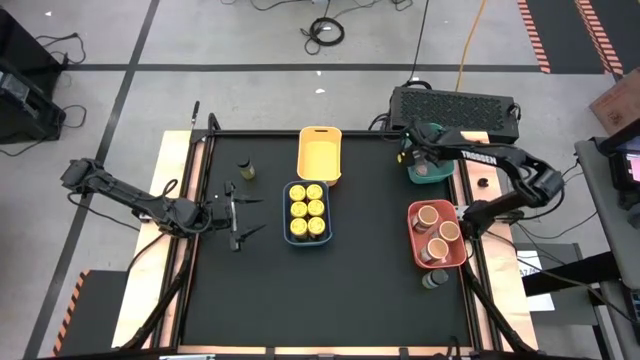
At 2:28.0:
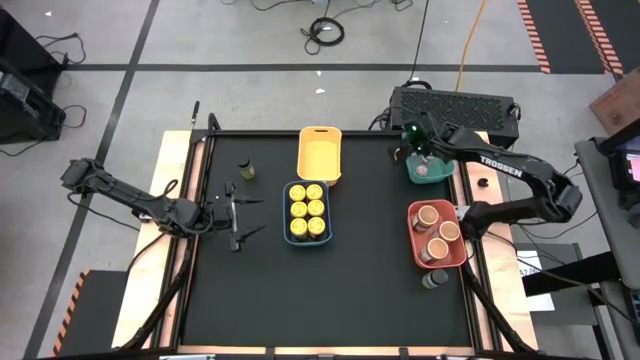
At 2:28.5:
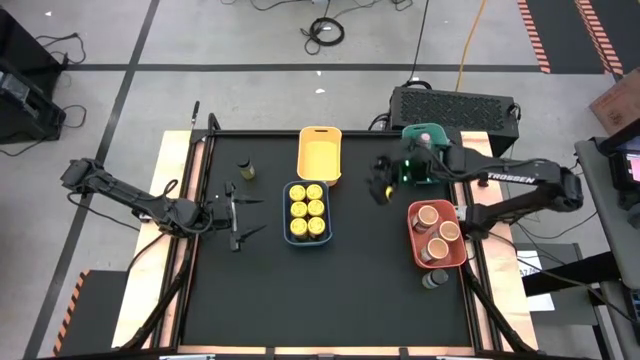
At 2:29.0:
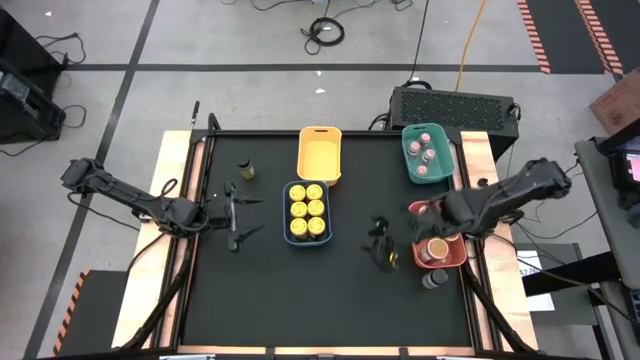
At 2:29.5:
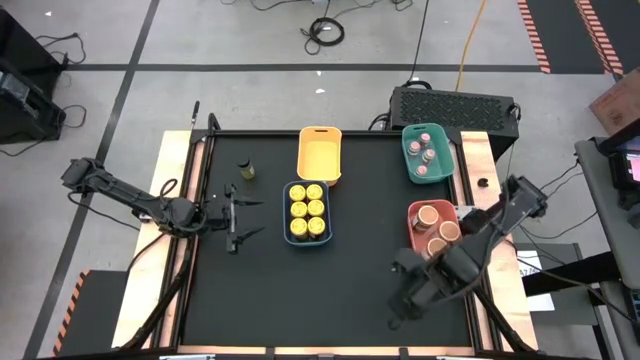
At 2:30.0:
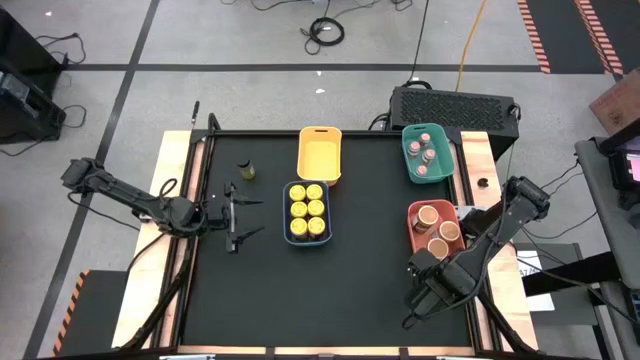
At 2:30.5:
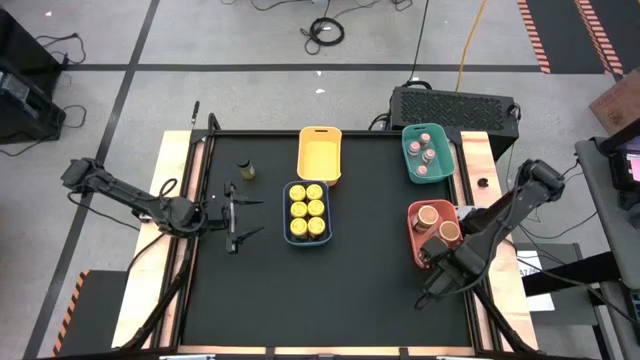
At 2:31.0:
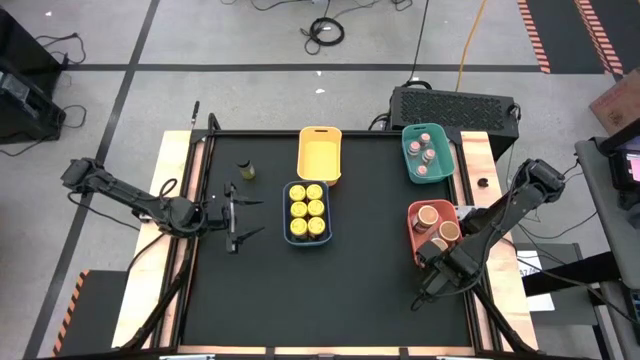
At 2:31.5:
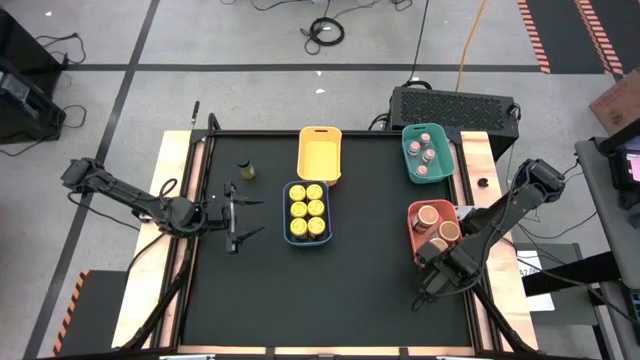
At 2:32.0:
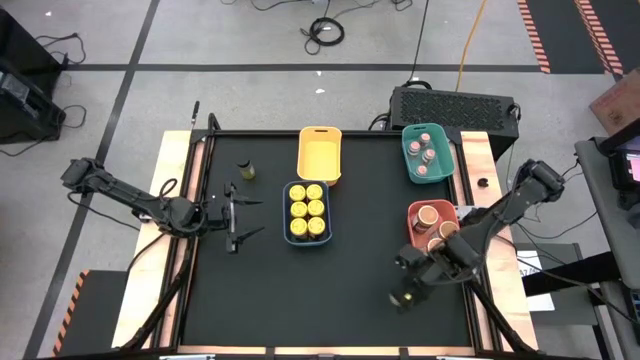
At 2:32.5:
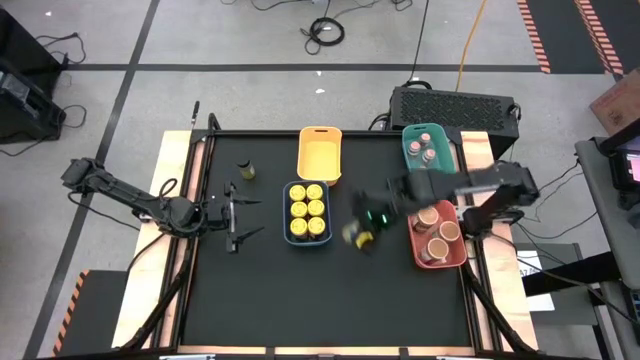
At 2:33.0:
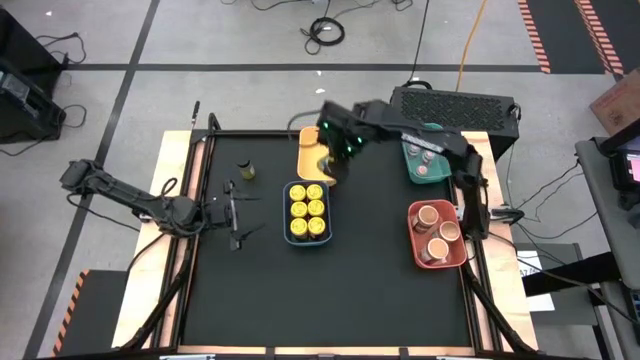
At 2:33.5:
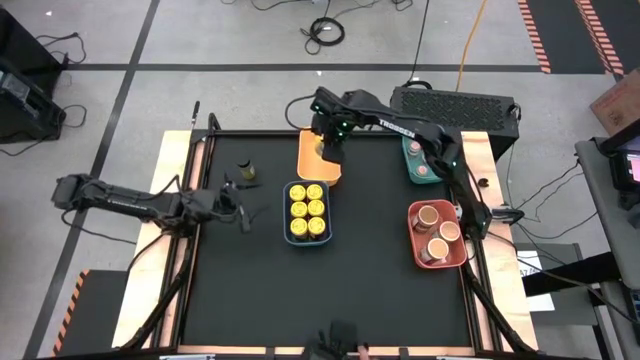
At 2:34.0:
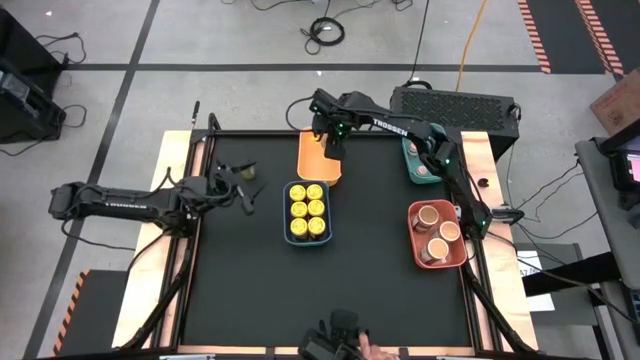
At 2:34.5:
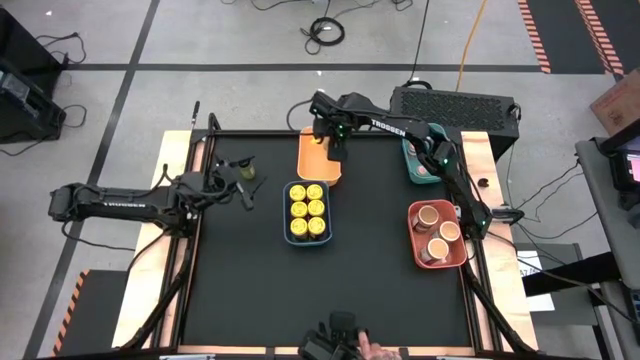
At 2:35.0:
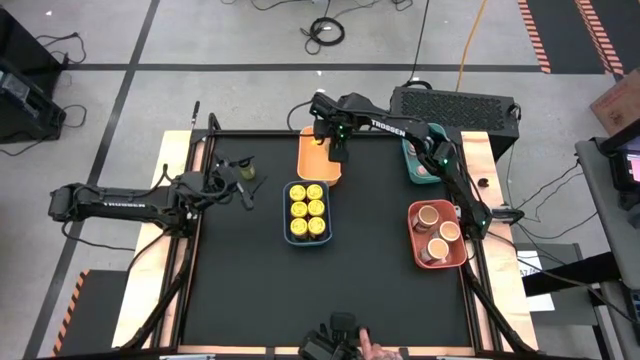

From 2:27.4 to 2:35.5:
Task: Sort spices by type
Put the black seasoning bottle into the yellow bin

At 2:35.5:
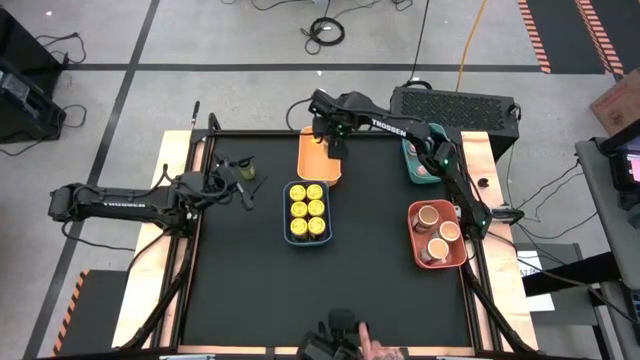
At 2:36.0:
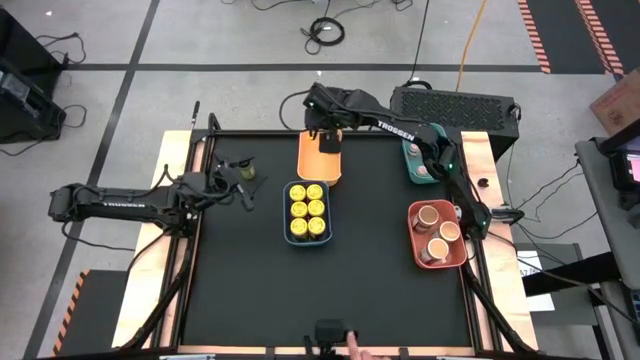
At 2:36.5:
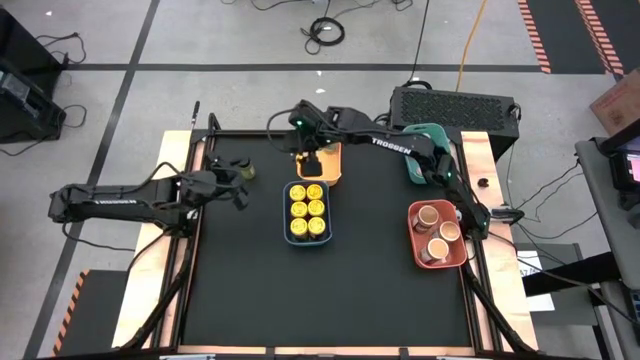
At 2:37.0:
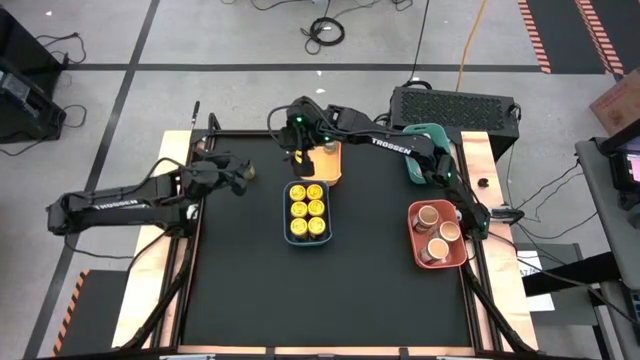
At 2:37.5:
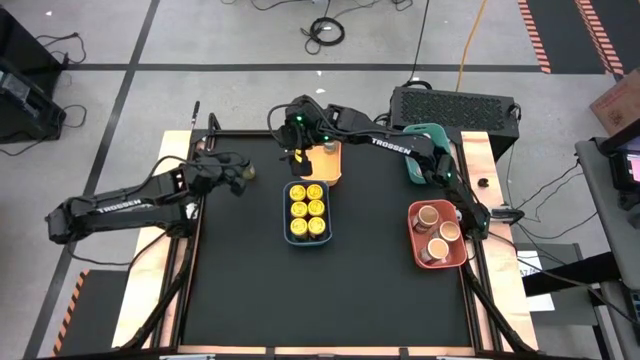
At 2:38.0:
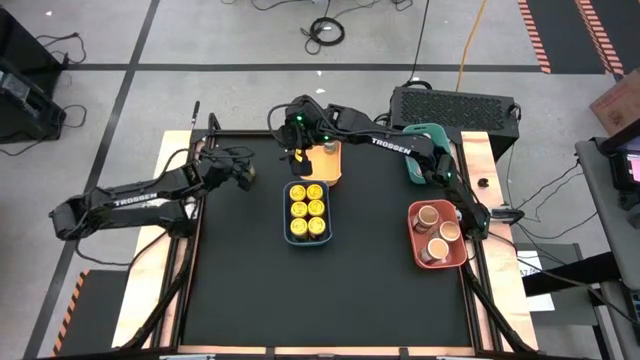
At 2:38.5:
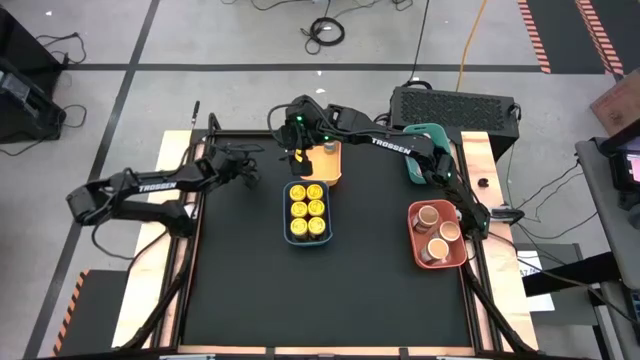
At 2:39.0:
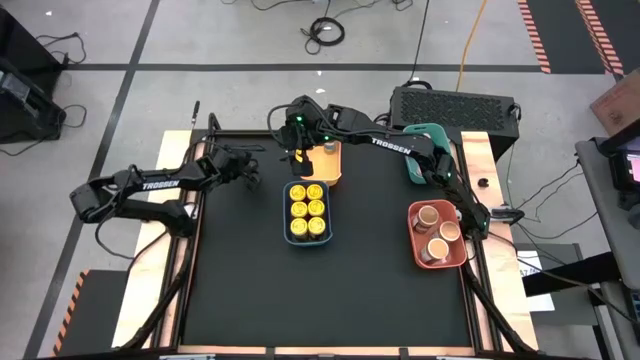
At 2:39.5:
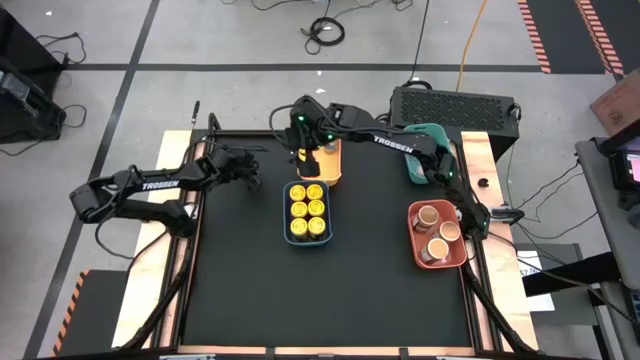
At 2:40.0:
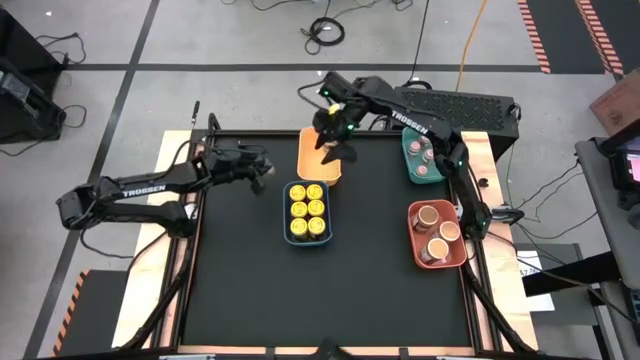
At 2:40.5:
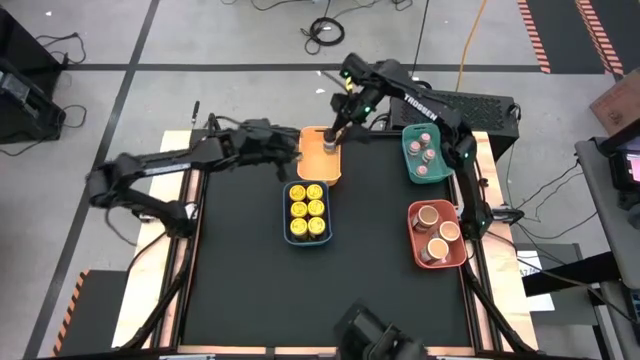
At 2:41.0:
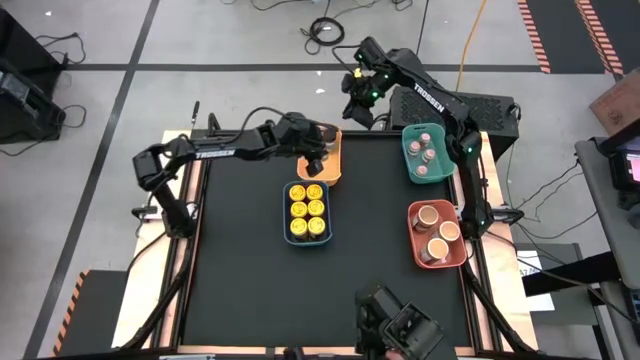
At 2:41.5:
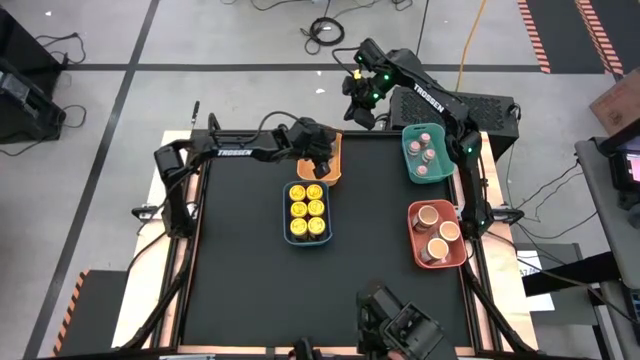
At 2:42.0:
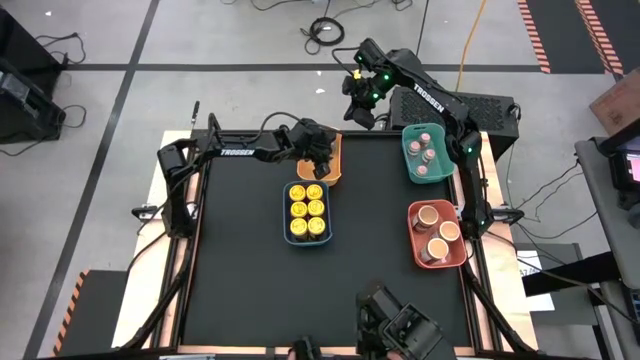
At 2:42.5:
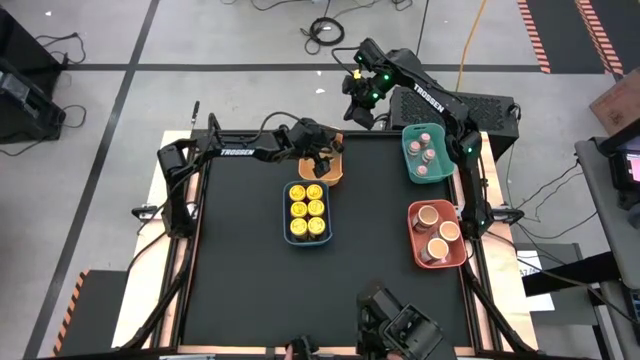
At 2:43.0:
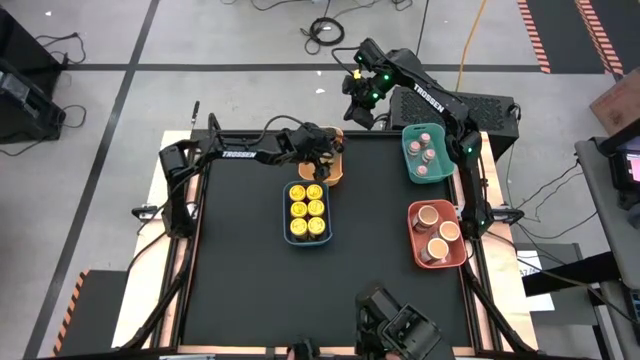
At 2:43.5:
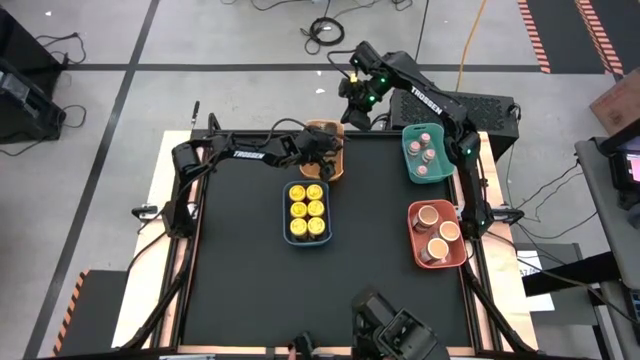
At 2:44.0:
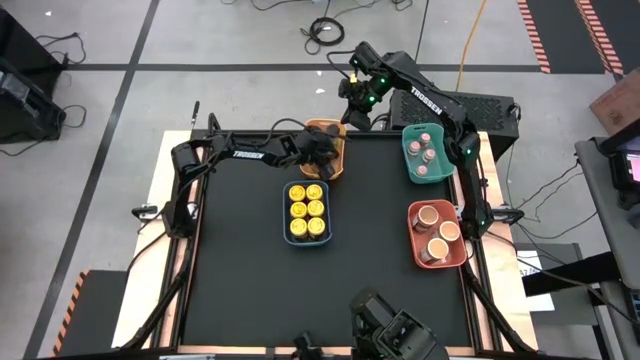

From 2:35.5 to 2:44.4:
Put the black seasoning bottle into the yellow bin

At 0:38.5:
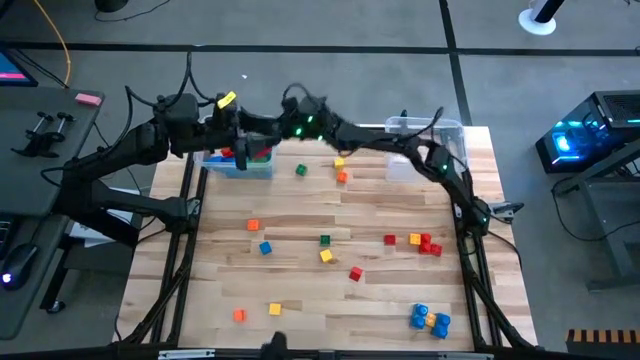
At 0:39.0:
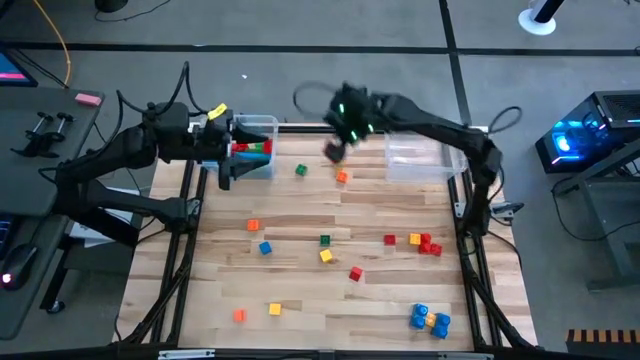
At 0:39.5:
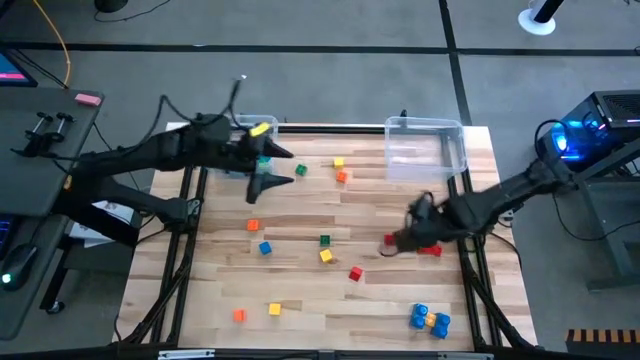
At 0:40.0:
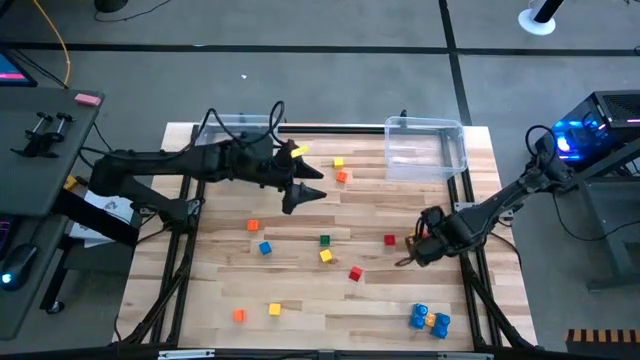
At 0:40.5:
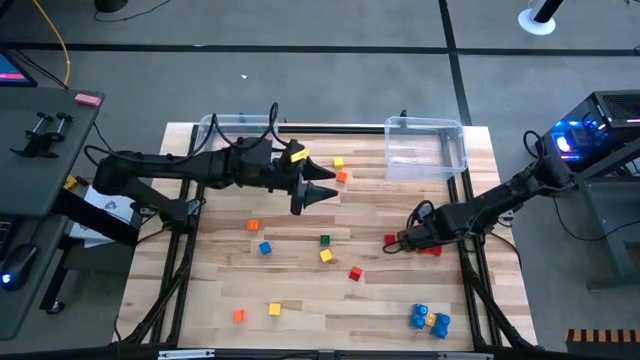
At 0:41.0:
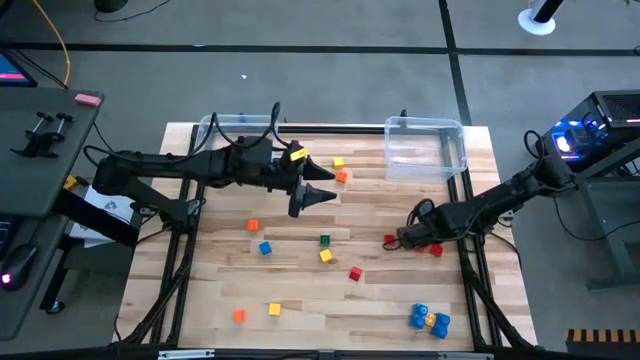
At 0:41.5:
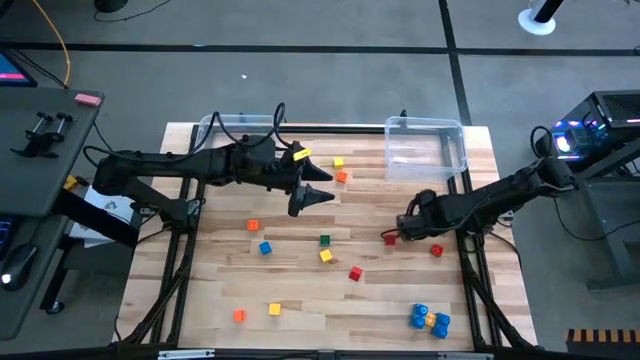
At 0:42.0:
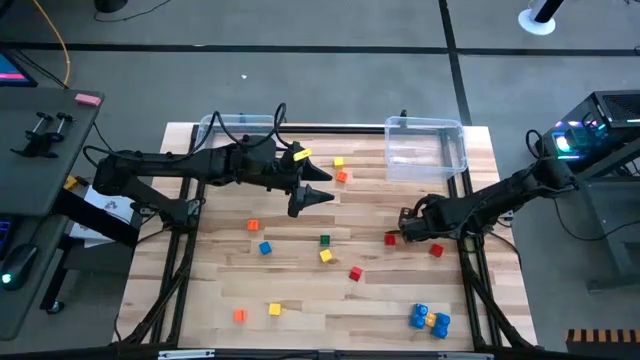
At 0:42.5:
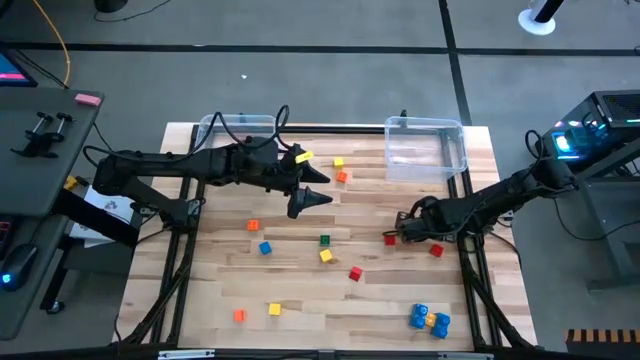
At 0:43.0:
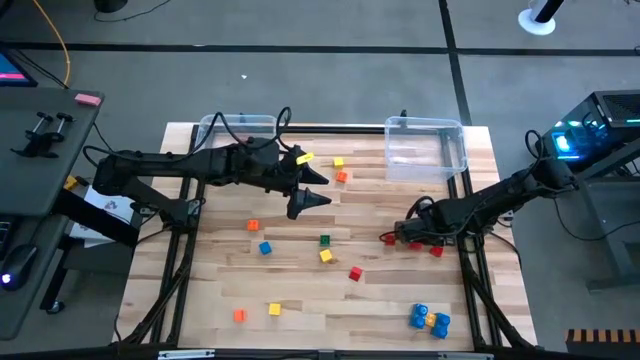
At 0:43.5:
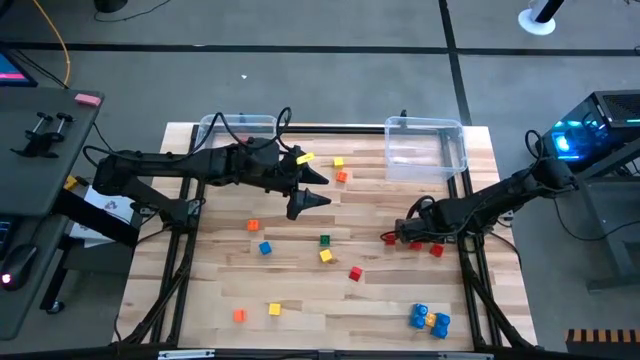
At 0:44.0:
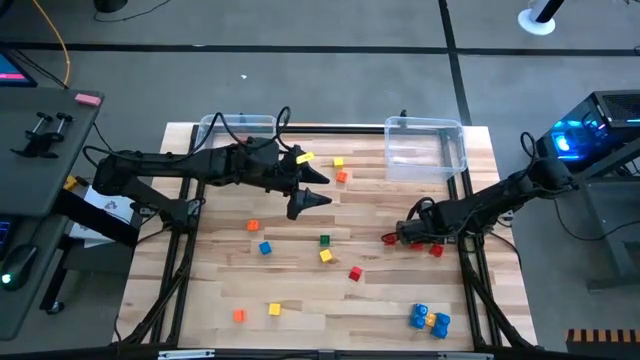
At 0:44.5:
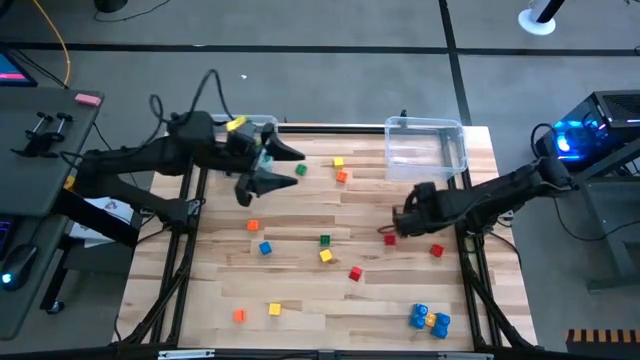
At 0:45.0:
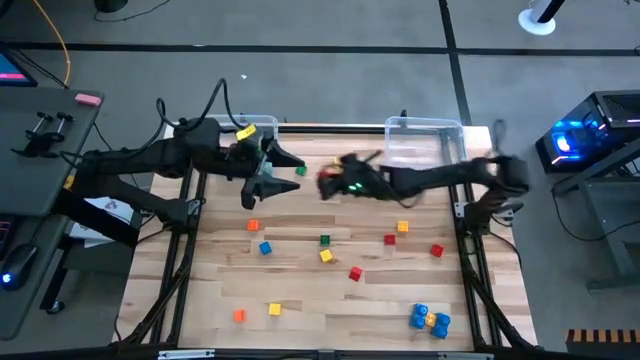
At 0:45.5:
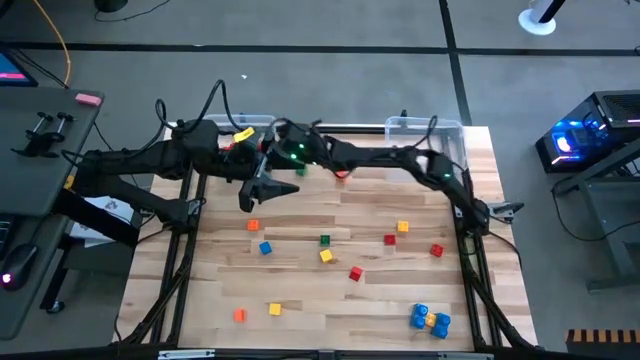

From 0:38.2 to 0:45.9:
Task: Sort blocks by size
Put the large game piece into the left transparent bin
